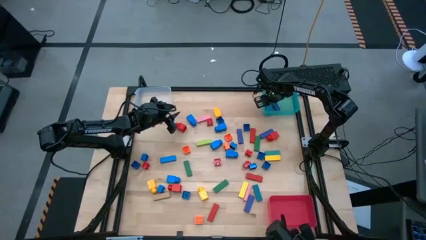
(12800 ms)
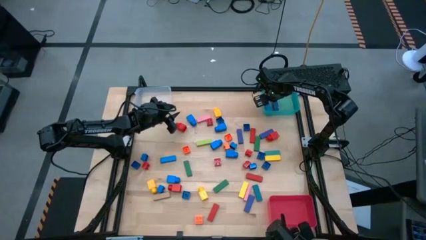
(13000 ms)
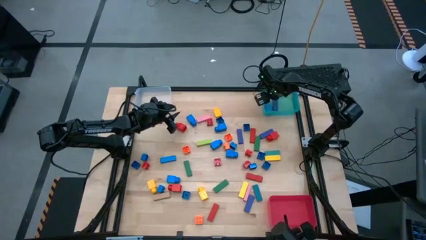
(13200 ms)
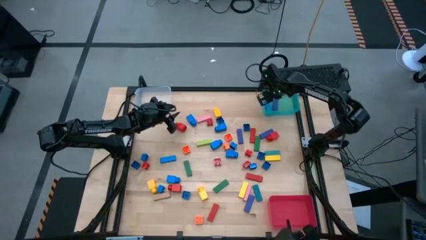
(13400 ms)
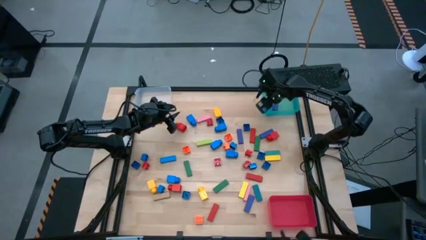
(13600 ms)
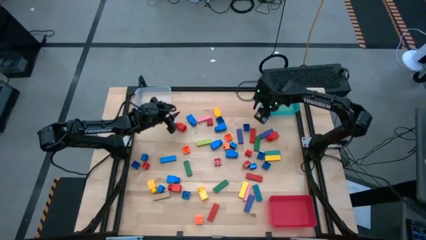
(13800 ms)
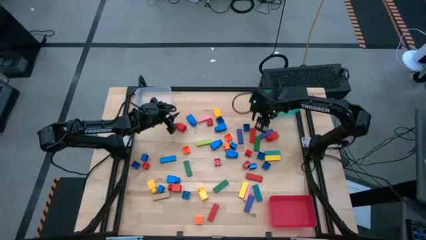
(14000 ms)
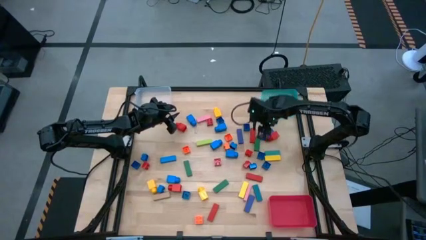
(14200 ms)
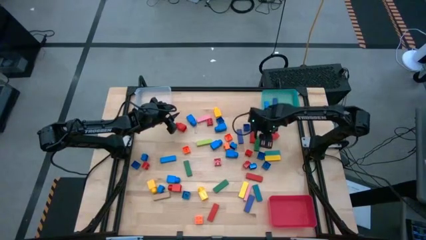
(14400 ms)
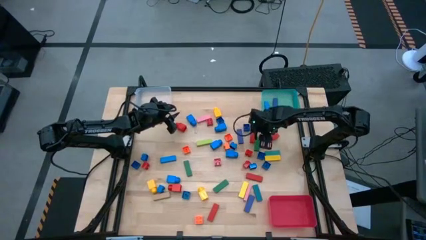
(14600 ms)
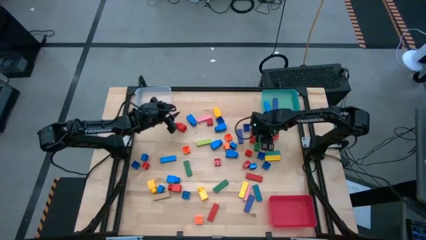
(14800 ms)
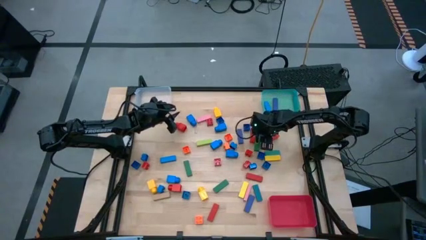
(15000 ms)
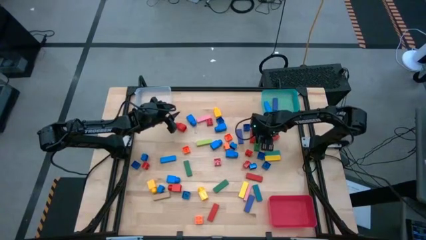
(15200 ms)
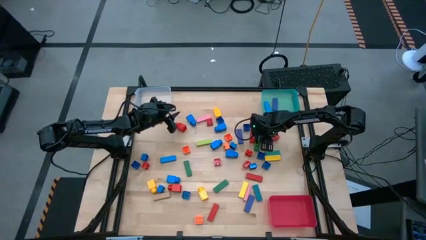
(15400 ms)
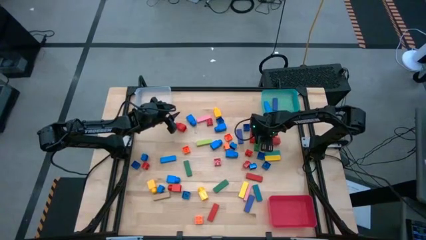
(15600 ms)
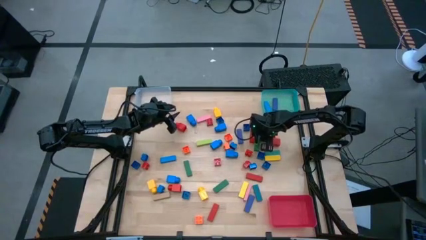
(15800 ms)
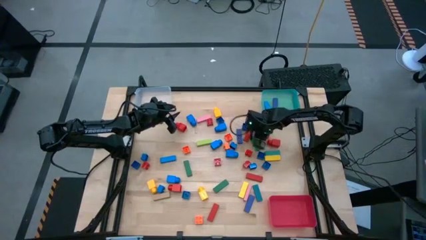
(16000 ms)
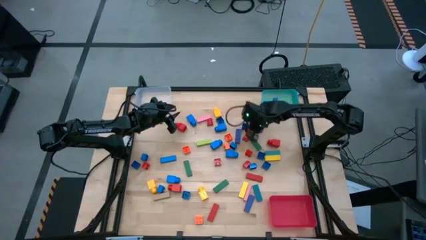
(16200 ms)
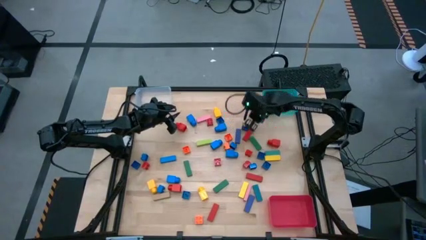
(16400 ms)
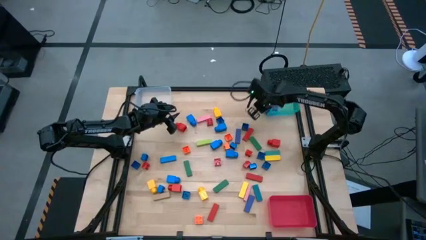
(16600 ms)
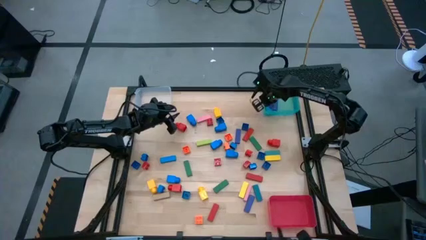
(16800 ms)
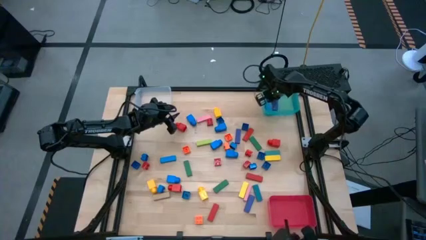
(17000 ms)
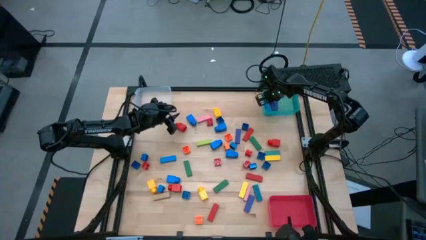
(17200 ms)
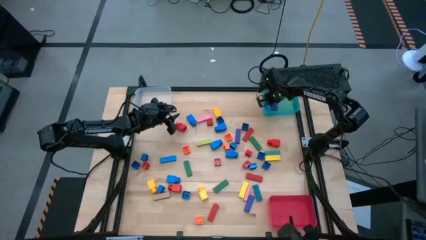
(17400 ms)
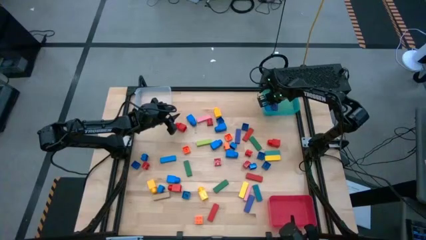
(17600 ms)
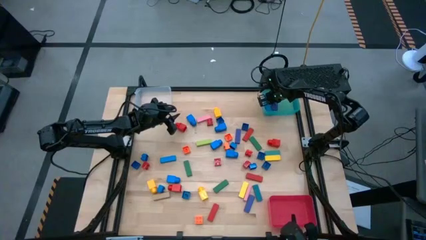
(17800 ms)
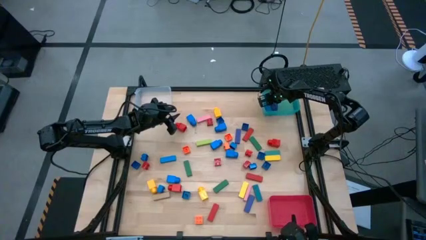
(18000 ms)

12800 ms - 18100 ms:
Task: Sort blocks by size
Put the blue block into the blue bin

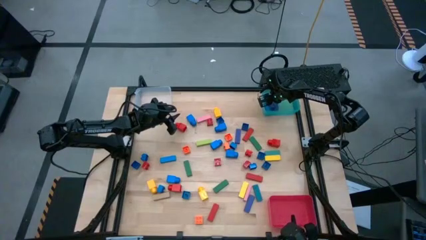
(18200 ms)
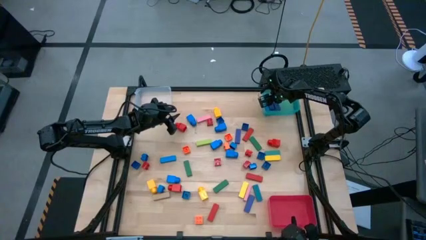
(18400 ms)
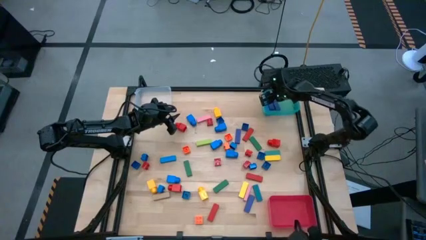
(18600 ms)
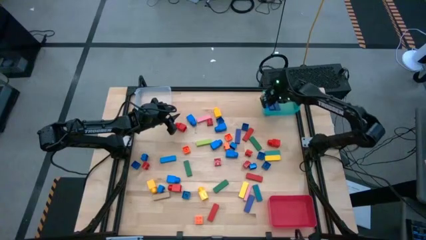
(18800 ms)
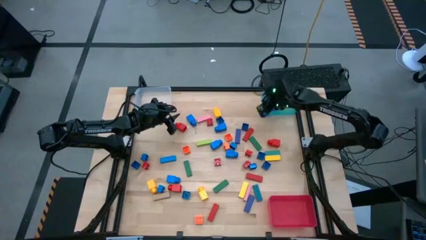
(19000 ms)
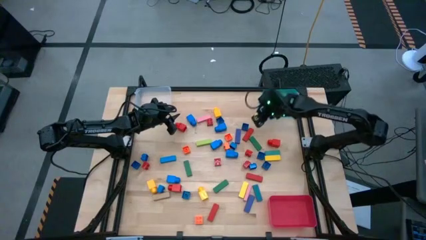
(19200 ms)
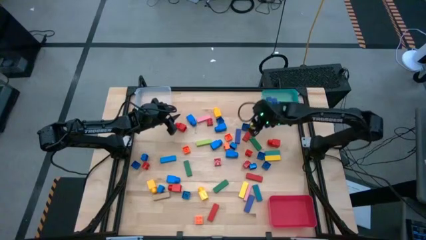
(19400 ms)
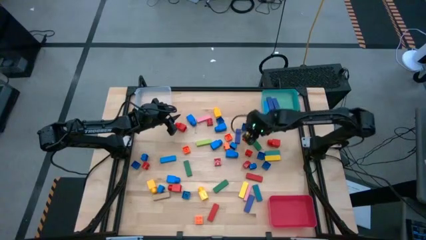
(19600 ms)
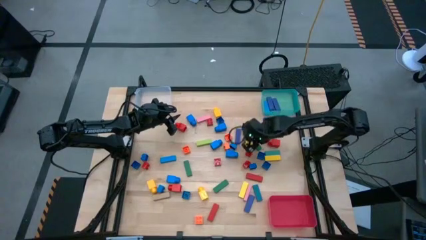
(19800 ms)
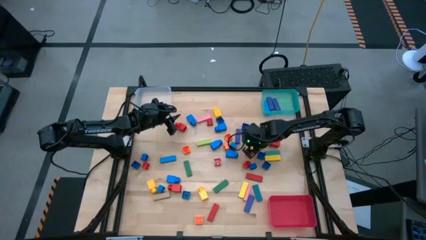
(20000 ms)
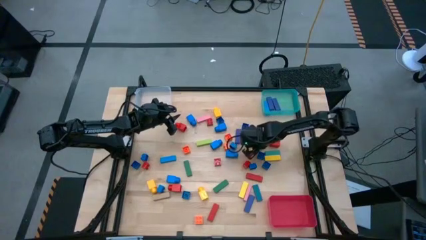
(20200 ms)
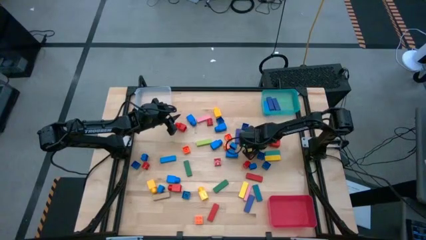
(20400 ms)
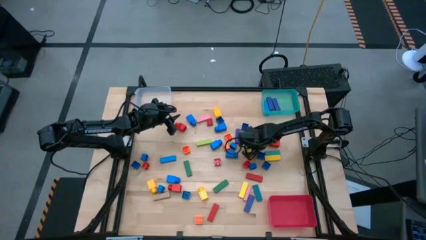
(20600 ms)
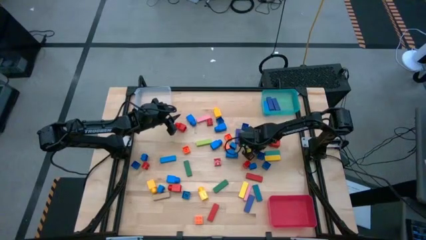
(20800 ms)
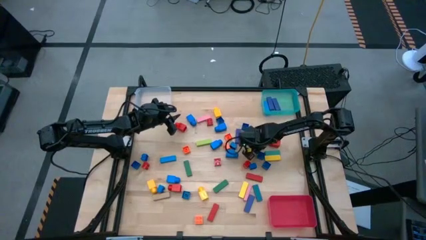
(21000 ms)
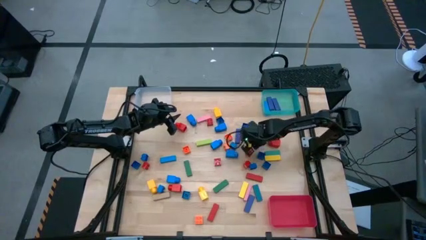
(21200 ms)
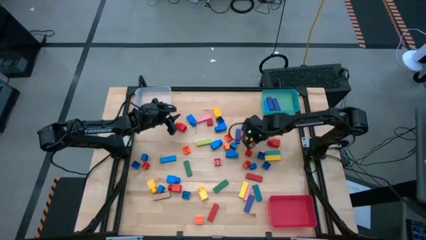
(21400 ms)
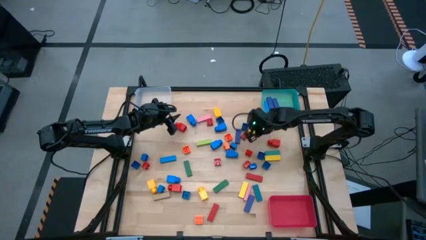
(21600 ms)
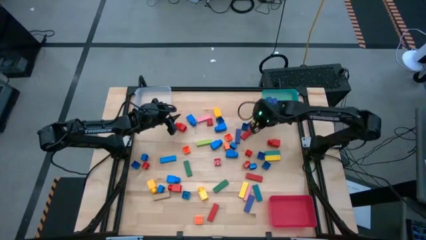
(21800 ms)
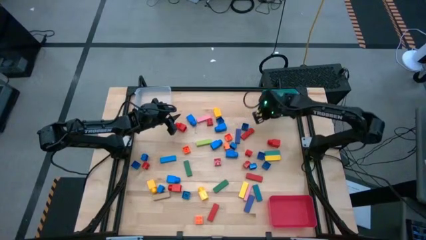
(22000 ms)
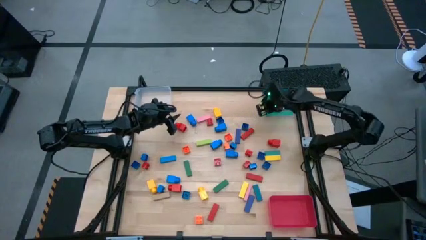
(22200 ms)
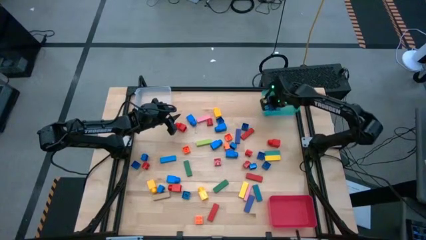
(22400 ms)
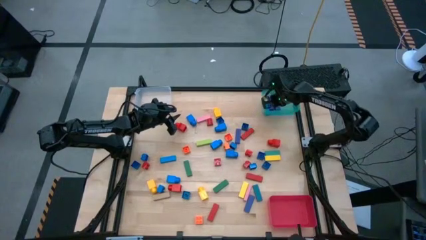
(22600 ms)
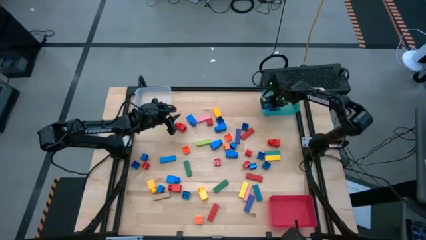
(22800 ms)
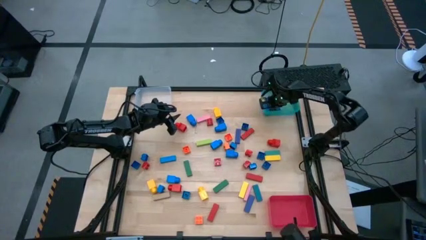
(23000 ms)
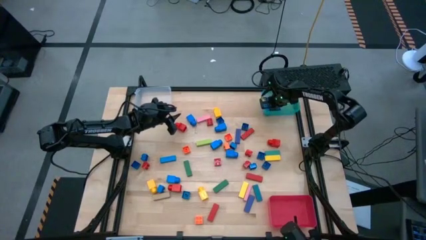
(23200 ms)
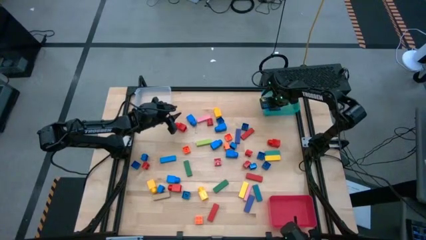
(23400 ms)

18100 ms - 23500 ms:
Put the green block into the blue bin

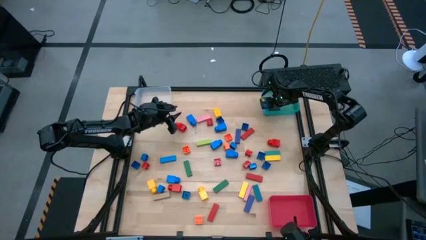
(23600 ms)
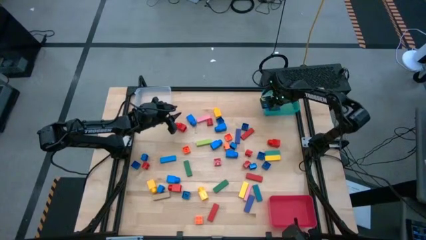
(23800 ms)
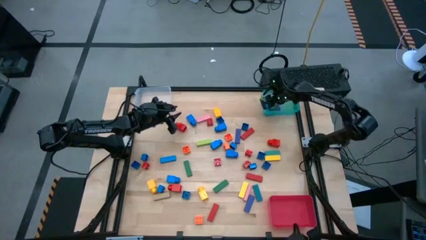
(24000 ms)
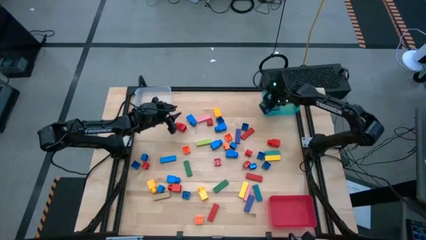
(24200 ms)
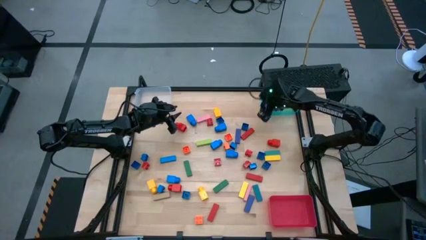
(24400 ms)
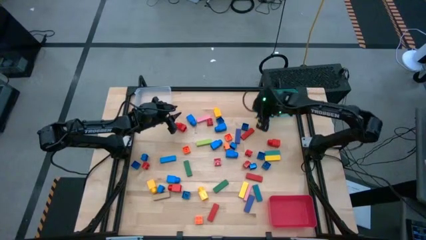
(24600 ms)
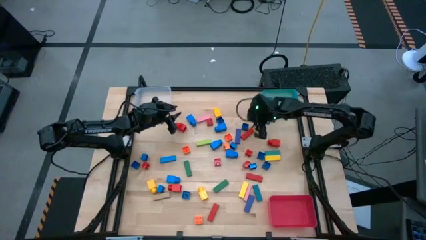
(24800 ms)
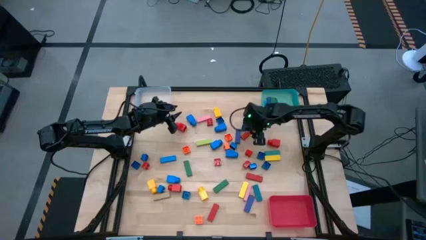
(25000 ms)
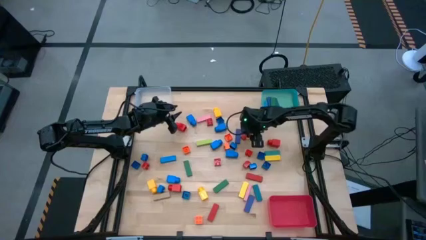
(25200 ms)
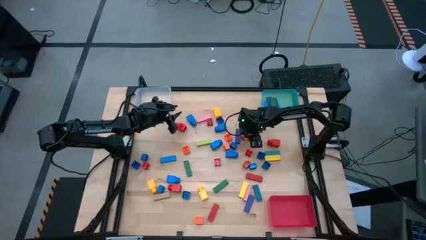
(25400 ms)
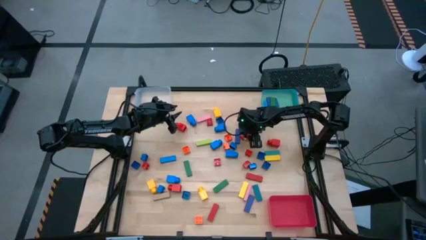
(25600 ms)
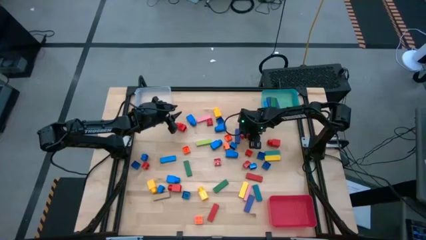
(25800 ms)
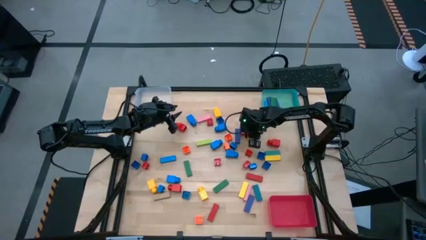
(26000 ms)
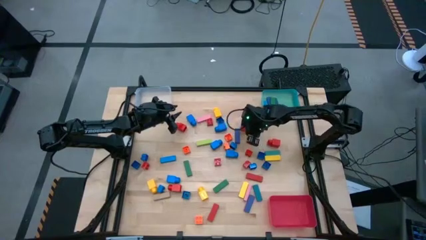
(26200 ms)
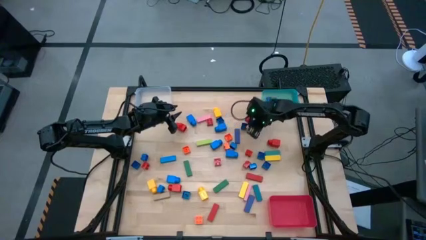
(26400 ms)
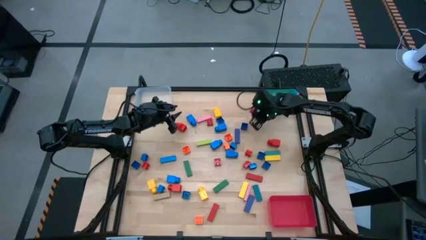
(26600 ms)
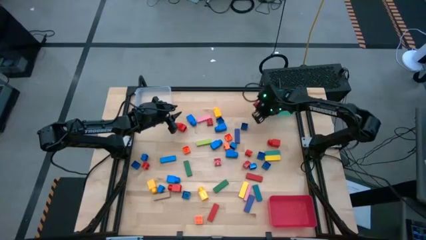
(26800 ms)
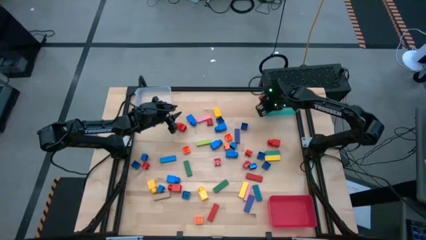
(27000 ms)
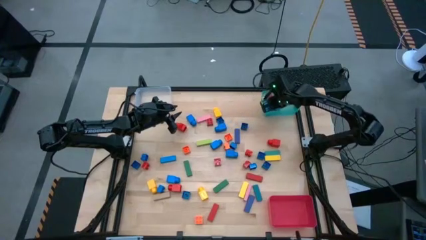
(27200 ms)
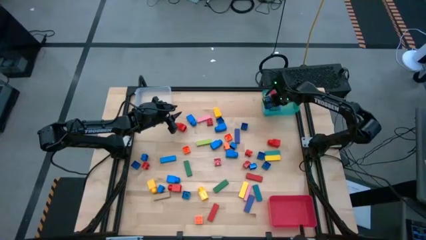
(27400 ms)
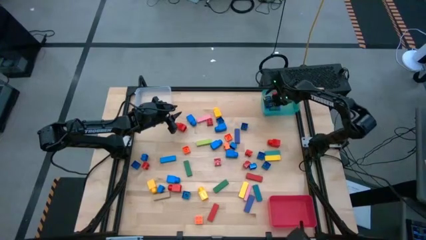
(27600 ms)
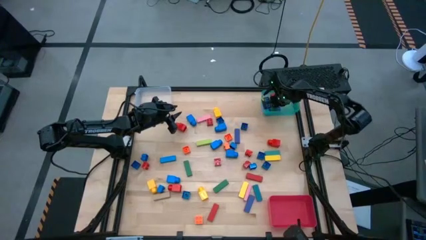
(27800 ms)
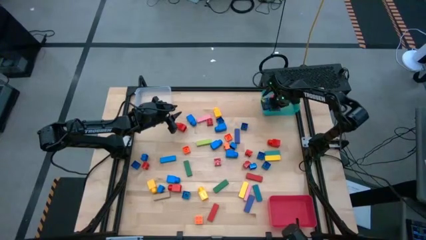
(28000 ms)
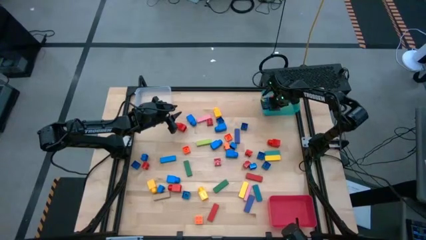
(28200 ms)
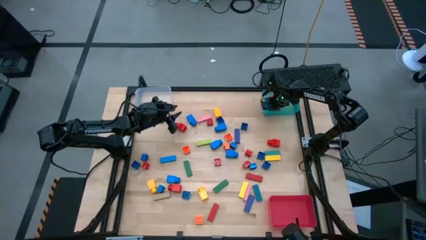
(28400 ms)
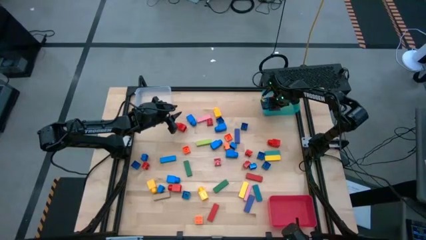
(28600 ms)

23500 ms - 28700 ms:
Put the red block into the blue bin
